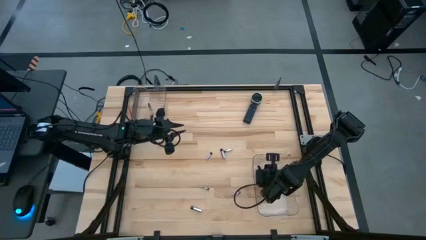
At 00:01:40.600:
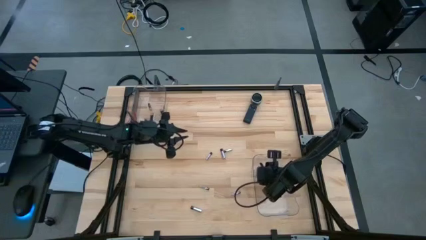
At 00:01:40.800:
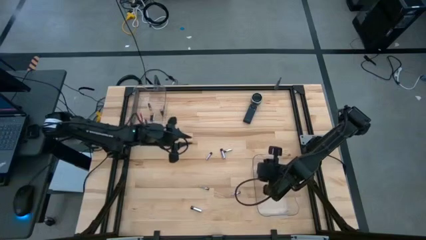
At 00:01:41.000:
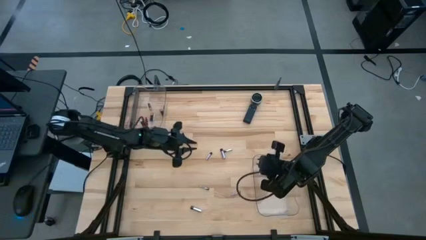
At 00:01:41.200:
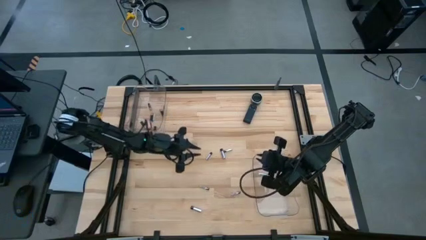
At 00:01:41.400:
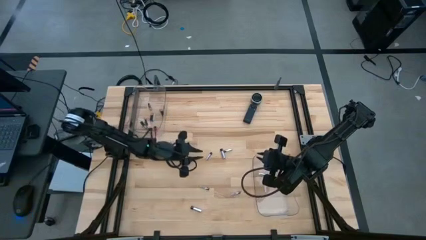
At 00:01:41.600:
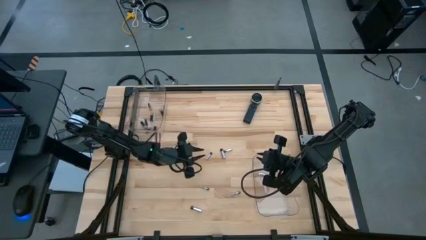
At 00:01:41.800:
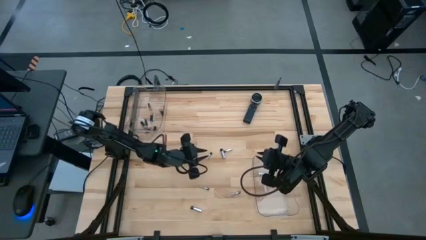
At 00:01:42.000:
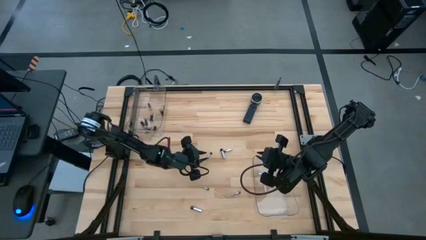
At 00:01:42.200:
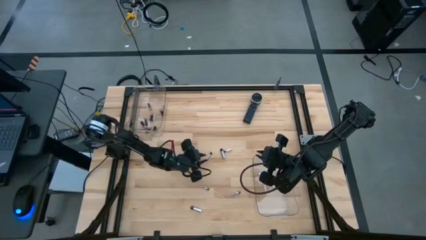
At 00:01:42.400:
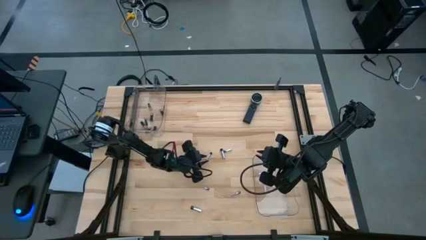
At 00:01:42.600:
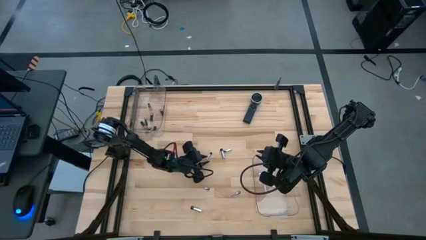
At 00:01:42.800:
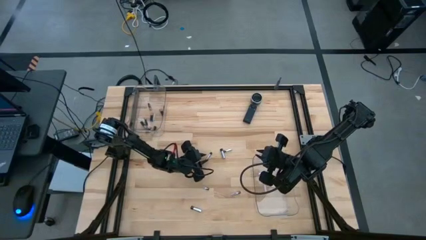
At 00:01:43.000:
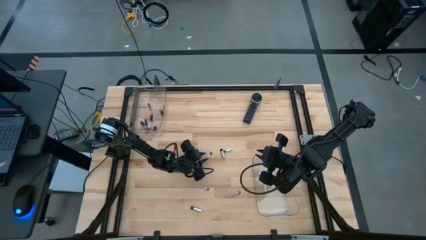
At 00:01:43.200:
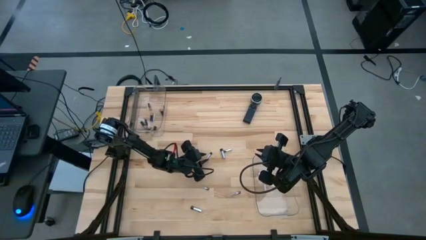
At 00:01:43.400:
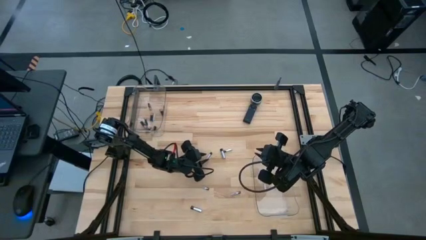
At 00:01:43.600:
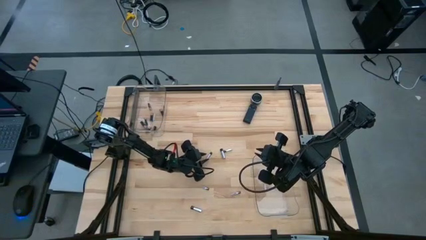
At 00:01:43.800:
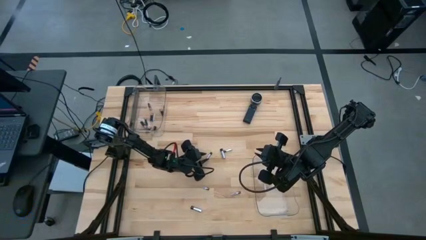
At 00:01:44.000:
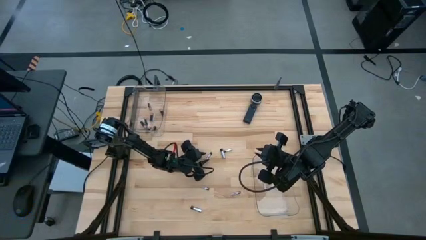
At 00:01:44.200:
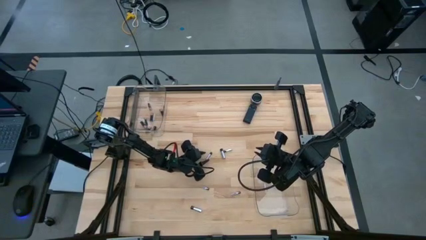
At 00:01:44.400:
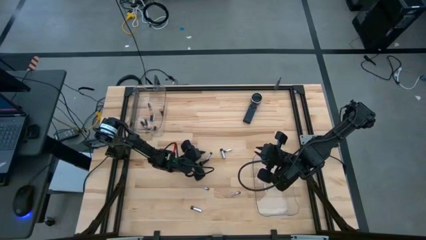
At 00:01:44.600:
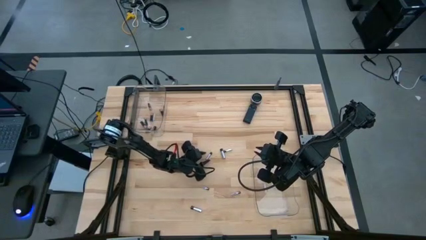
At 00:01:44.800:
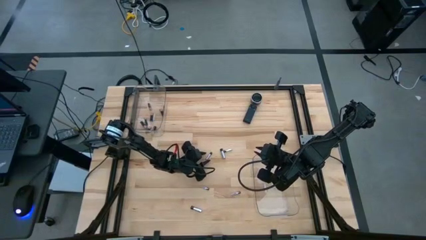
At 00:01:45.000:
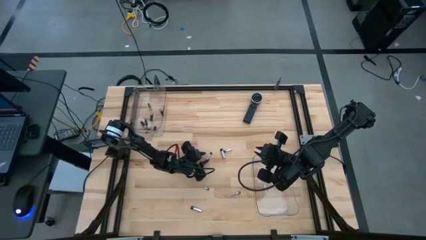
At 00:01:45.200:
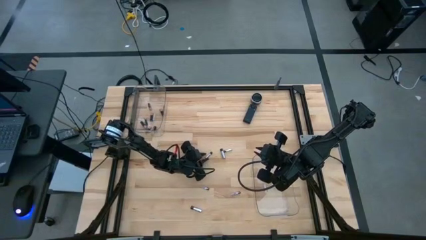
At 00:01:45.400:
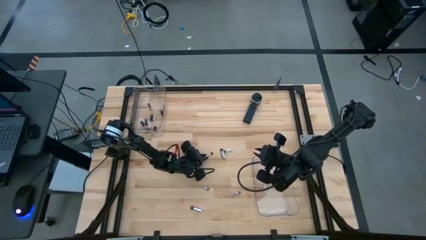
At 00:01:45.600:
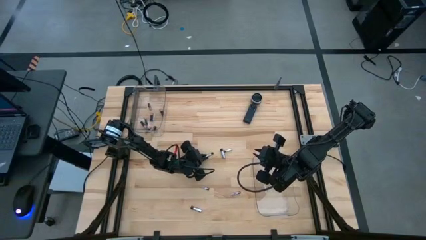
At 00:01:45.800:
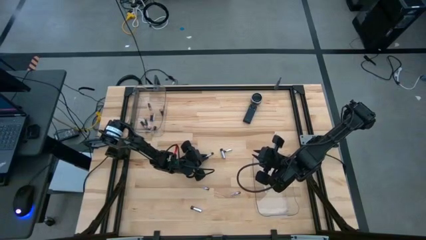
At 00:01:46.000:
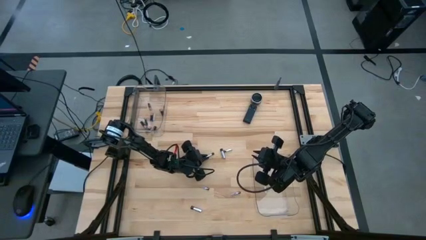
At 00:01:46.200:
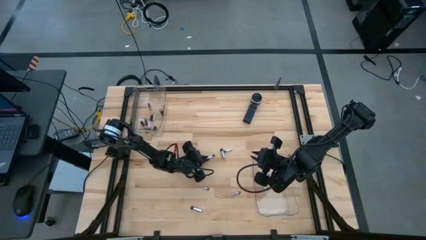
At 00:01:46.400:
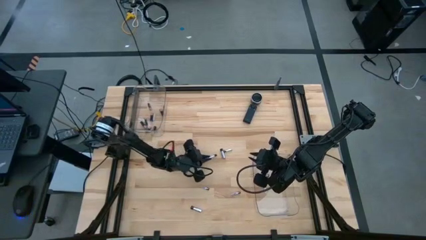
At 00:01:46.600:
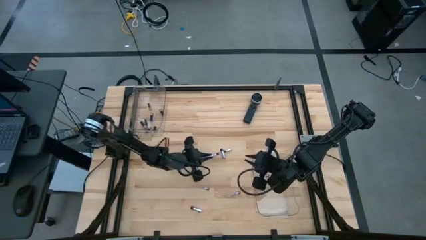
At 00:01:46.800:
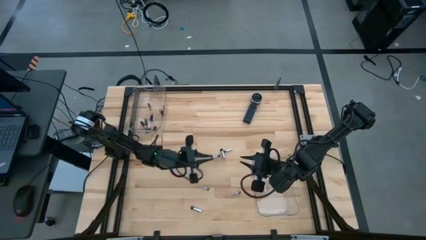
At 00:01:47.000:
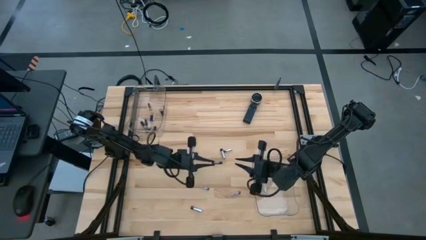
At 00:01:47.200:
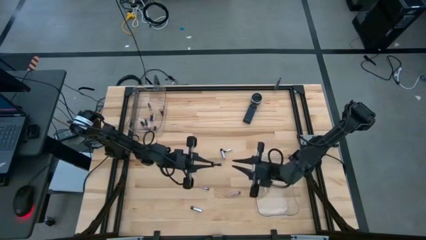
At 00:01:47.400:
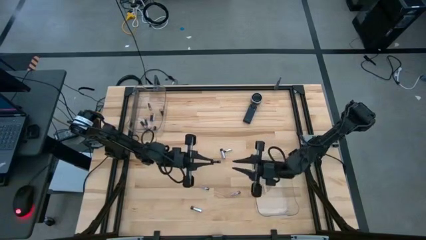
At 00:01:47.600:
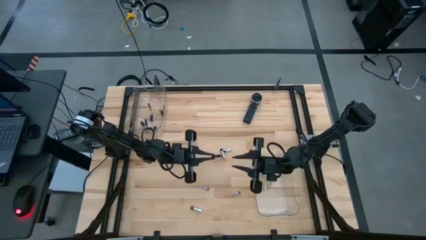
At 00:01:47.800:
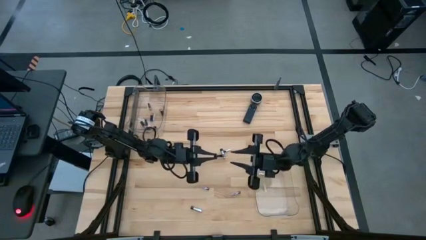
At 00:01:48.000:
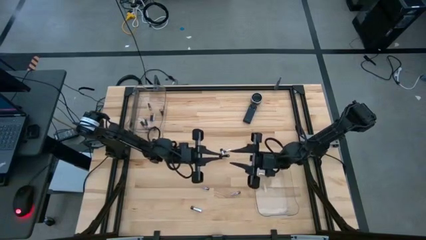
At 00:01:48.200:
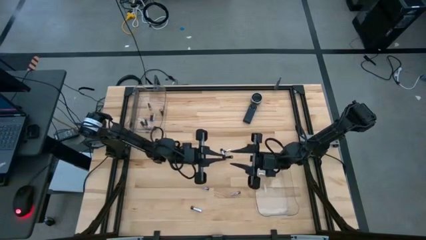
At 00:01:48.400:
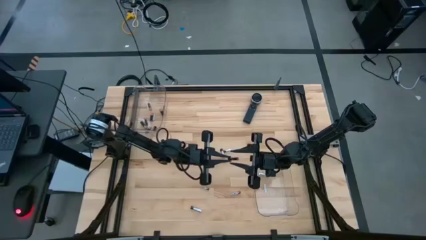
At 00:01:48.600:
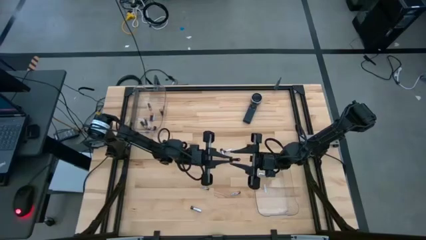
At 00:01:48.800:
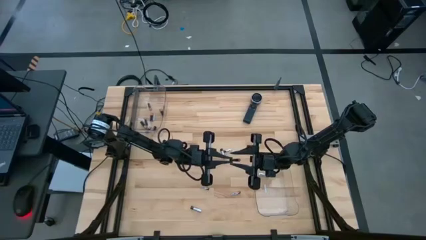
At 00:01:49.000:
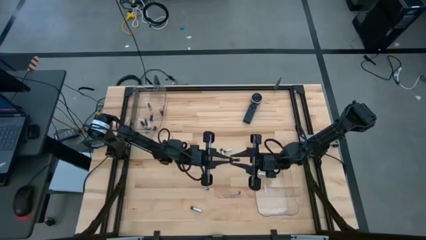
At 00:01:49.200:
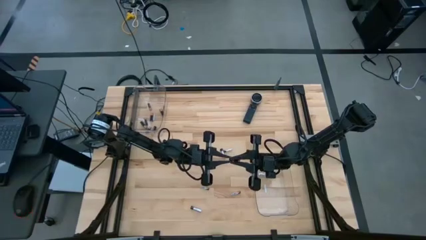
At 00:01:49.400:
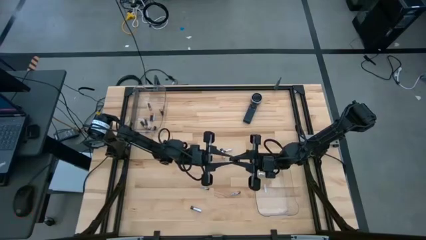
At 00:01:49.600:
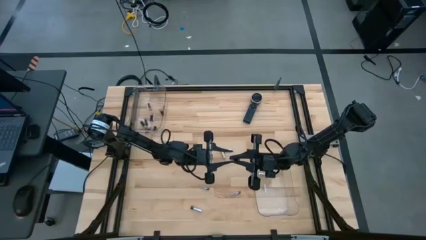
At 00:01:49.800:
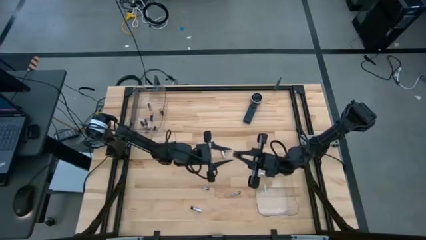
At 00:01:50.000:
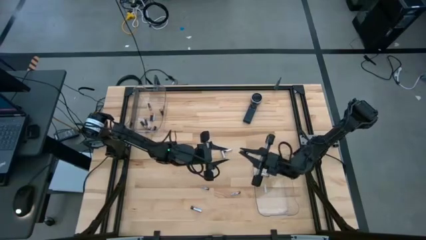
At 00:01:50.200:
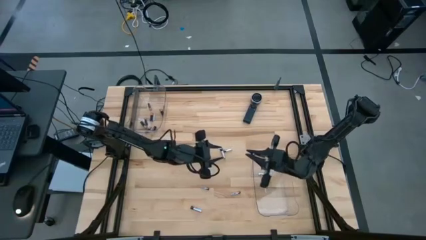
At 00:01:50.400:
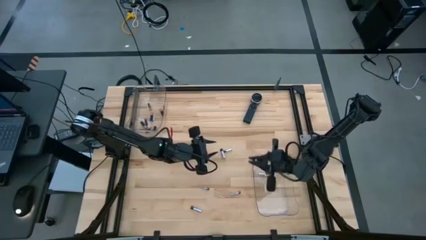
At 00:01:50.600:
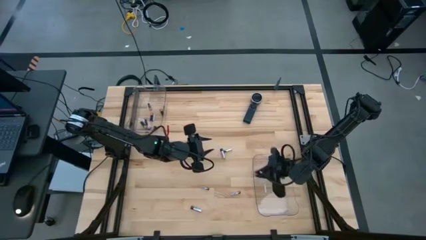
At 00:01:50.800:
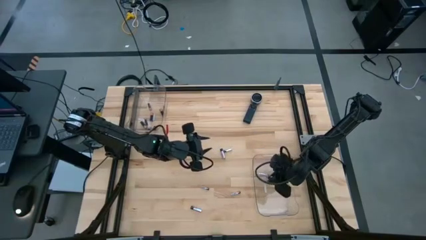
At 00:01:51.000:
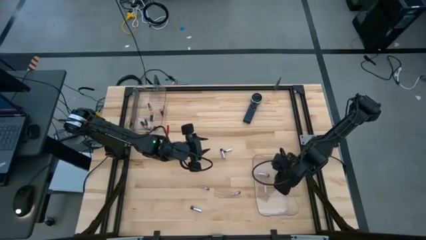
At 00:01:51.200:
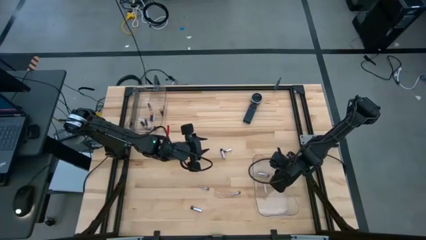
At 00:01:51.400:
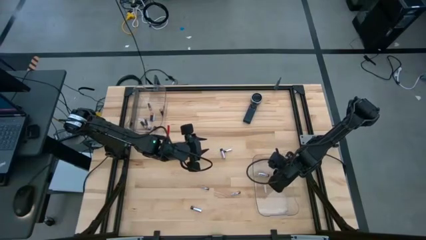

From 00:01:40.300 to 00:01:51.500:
Task: Sort batteries
Put the silver battery into the bottom transparent bin

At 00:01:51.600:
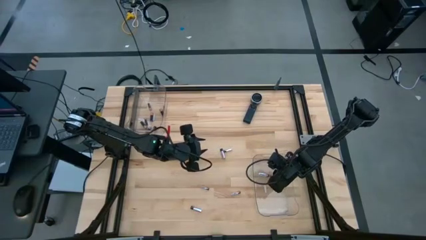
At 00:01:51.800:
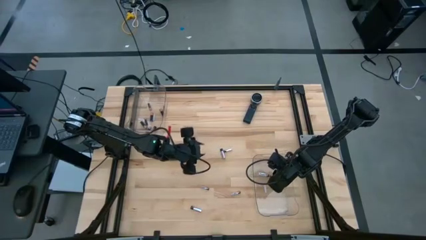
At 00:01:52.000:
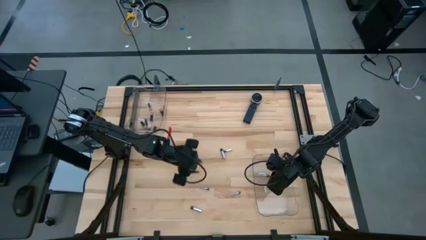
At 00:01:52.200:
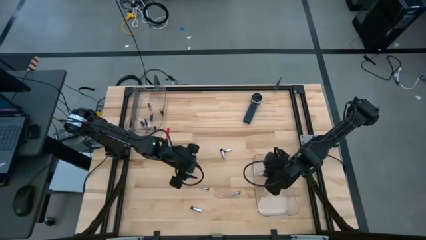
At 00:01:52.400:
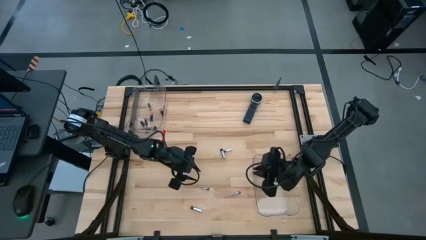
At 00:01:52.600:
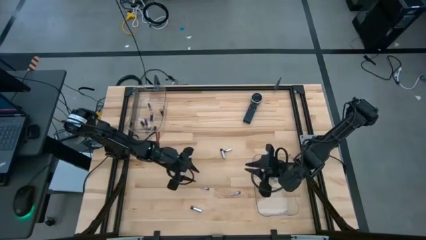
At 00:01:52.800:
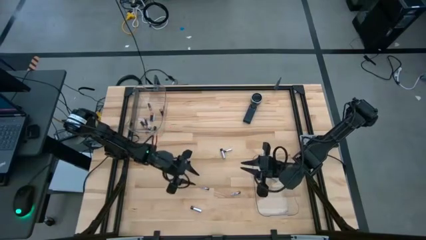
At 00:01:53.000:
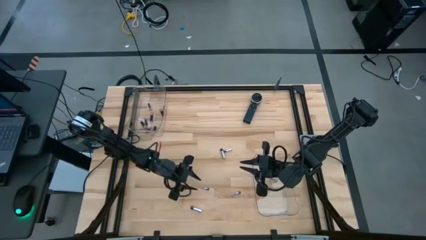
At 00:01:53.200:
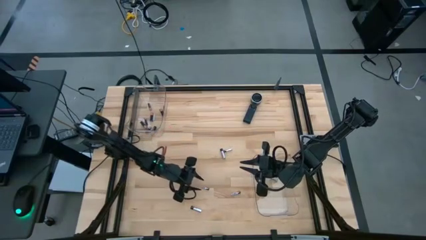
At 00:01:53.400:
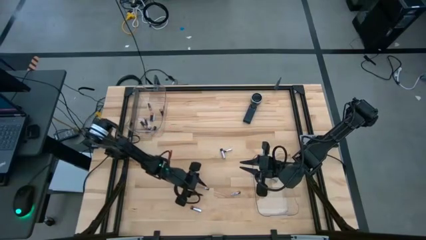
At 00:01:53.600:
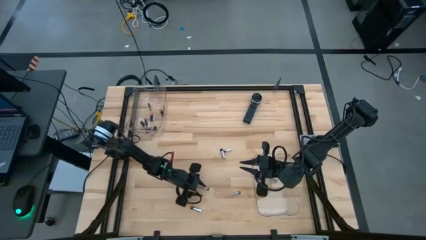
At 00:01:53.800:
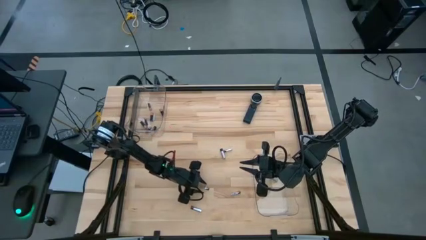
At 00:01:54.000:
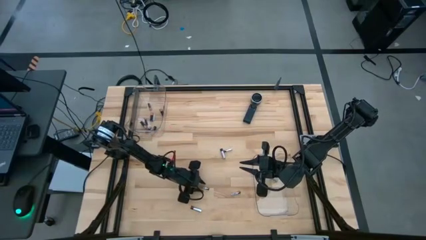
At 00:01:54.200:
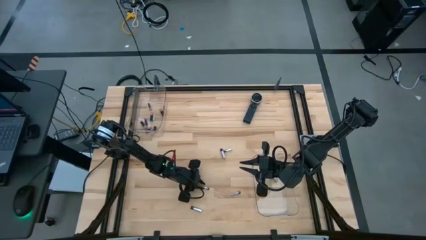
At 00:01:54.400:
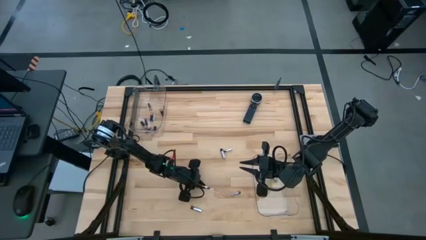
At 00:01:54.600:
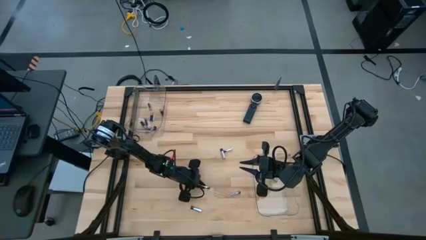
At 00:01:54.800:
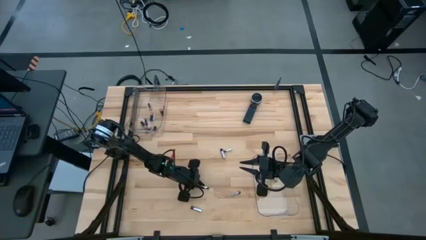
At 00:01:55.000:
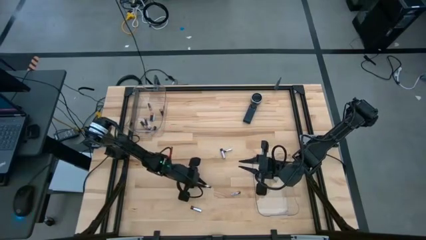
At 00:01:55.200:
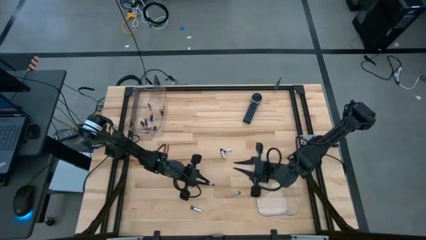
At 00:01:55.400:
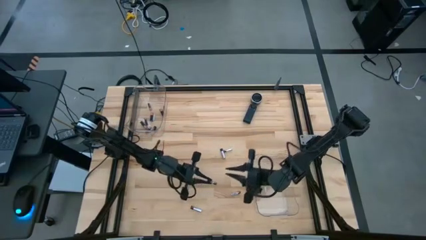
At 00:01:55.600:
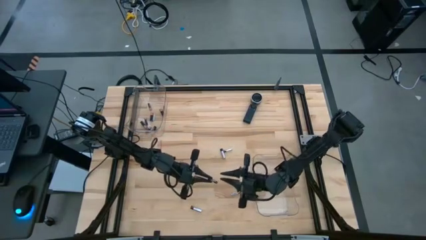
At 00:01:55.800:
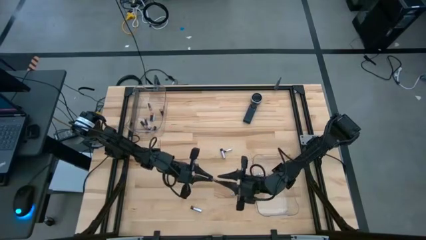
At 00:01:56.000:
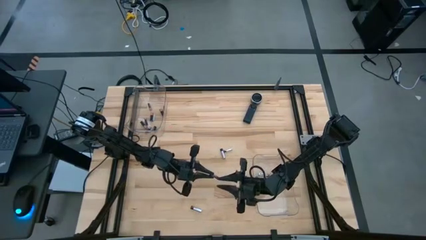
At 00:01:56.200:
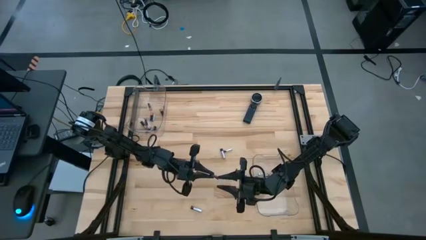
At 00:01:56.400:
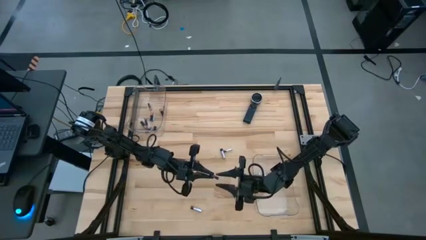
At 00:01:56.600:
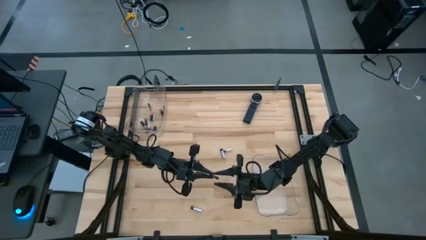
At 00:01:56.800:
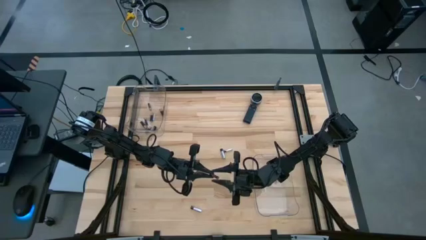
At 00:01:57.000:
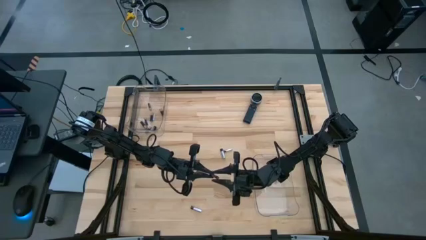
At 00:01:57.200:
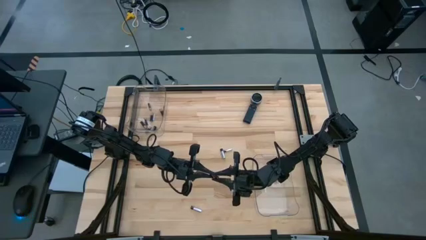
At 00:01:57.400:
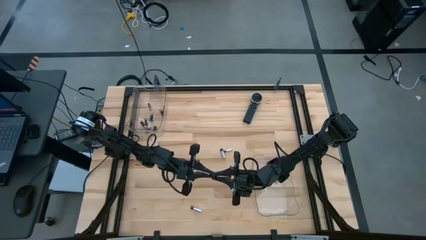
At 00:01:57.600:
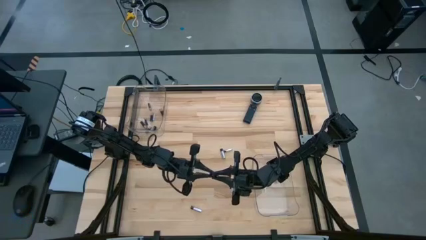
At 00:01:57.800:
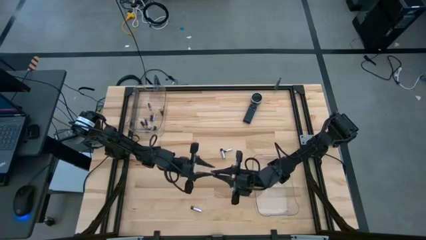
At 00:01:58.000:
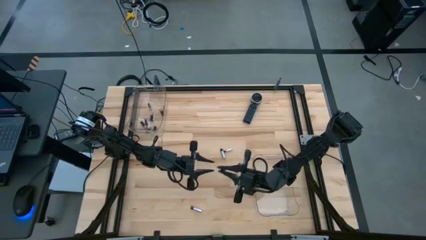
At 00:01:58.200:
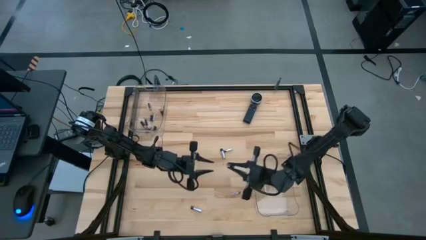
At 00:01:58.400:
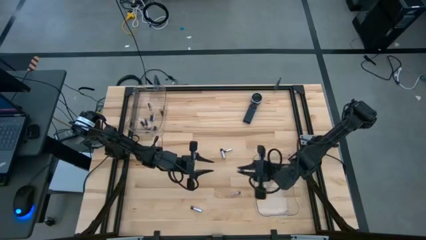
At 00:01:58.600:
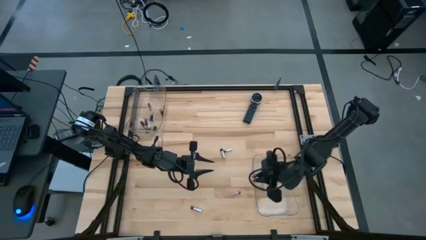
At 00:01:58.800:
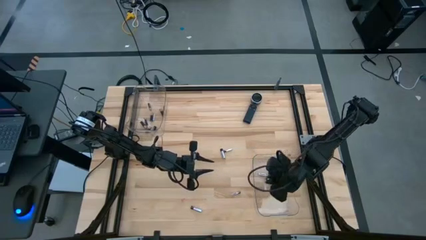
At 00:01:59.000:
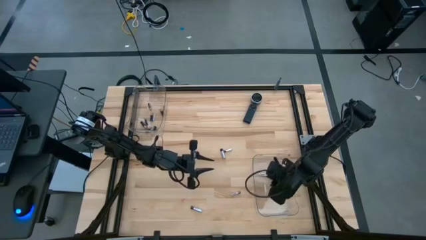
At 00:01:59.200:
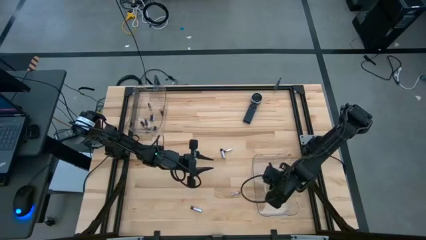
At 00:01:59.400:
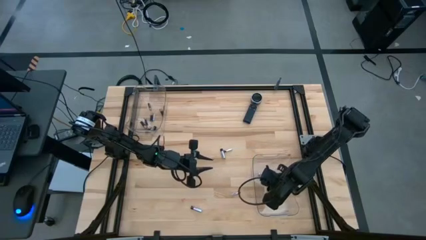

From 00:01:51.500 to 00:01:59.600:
Put the silver battery into the bottom transparent bin
